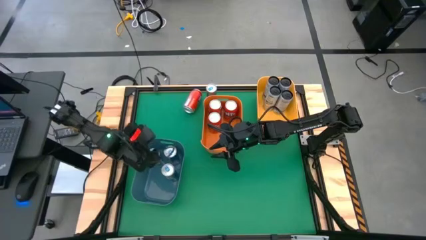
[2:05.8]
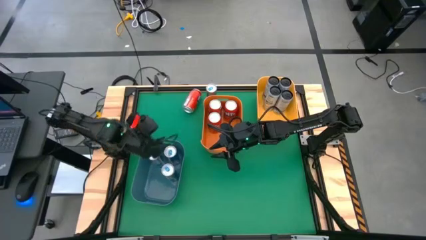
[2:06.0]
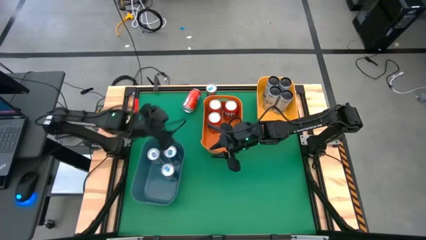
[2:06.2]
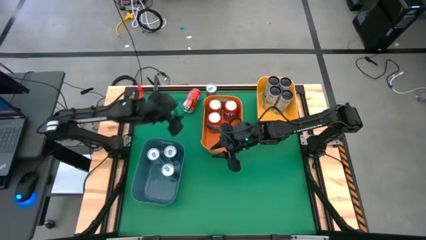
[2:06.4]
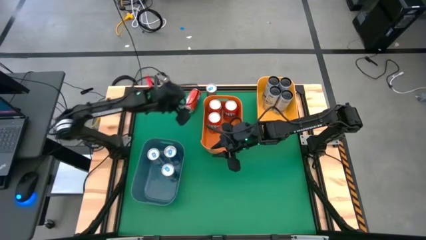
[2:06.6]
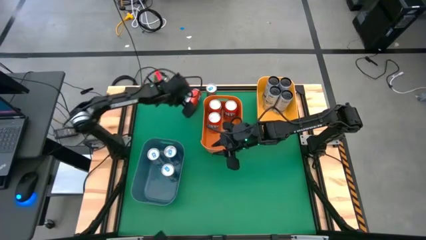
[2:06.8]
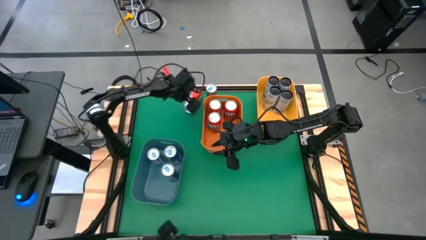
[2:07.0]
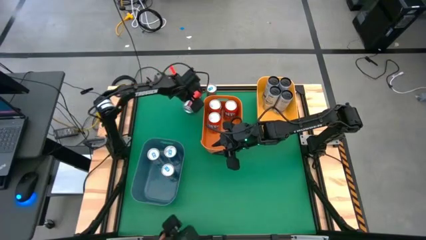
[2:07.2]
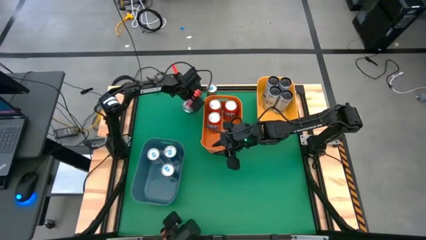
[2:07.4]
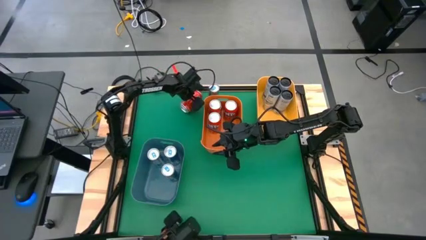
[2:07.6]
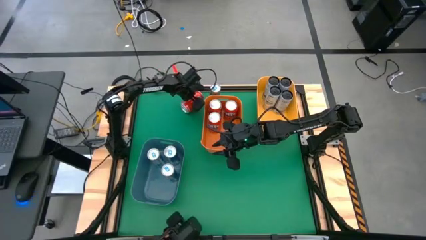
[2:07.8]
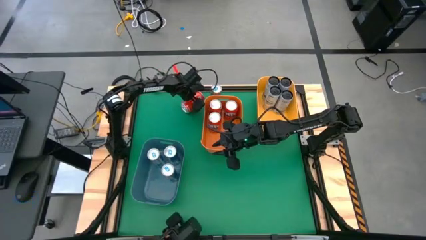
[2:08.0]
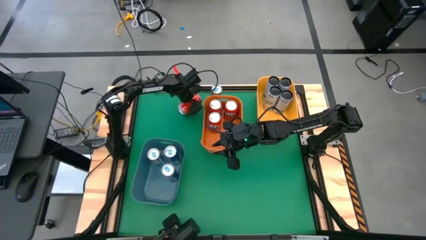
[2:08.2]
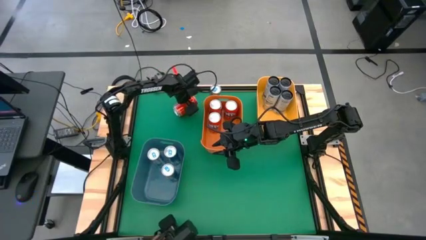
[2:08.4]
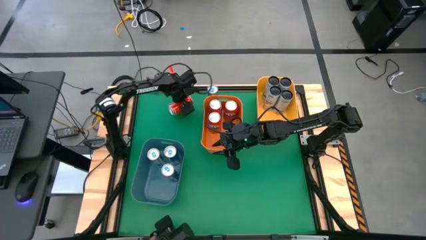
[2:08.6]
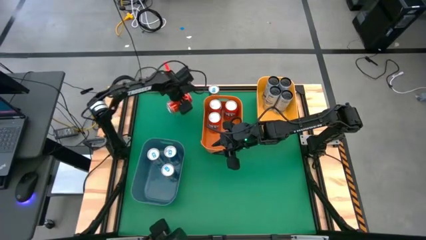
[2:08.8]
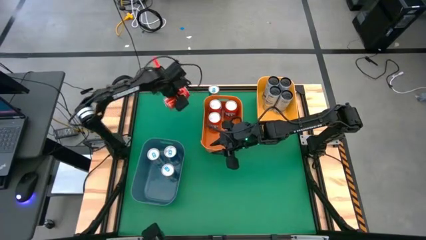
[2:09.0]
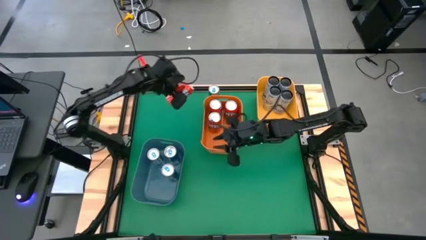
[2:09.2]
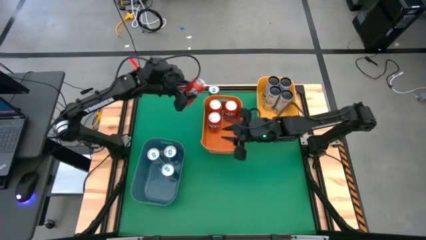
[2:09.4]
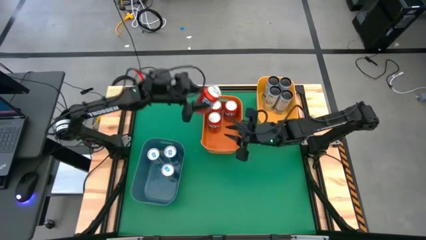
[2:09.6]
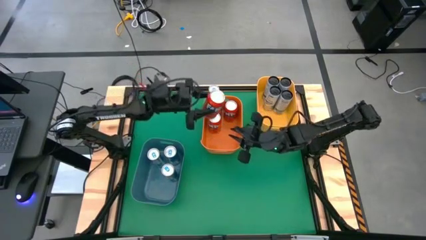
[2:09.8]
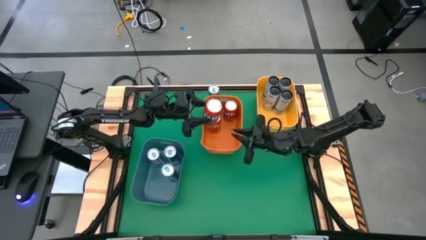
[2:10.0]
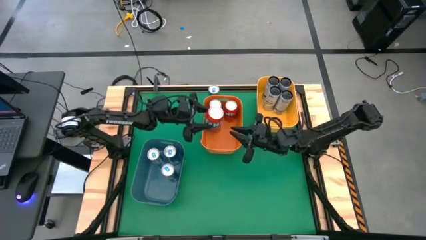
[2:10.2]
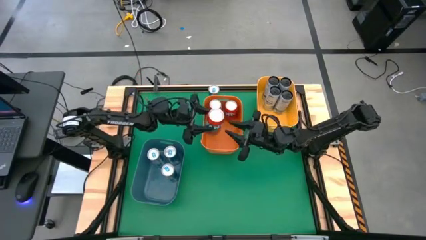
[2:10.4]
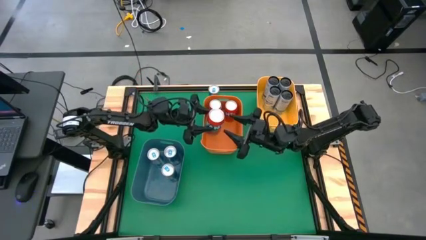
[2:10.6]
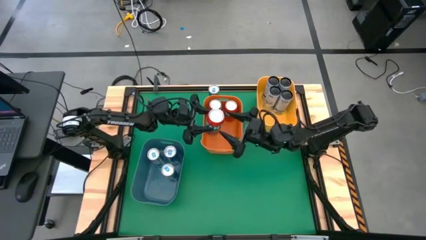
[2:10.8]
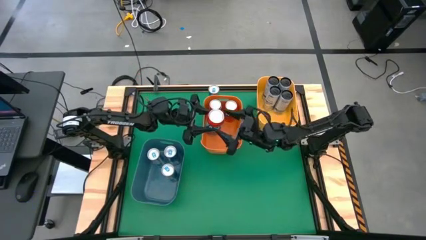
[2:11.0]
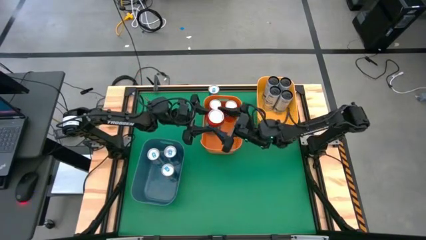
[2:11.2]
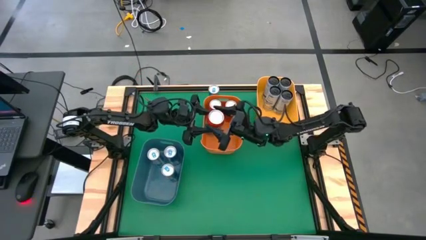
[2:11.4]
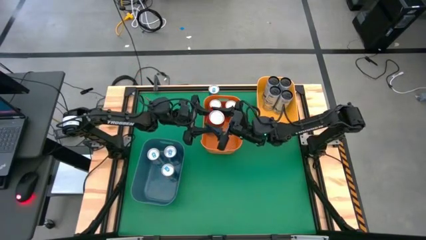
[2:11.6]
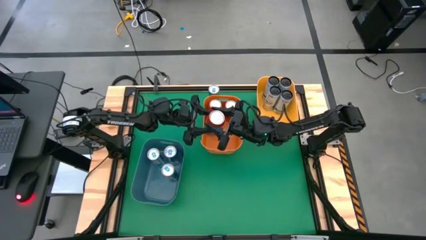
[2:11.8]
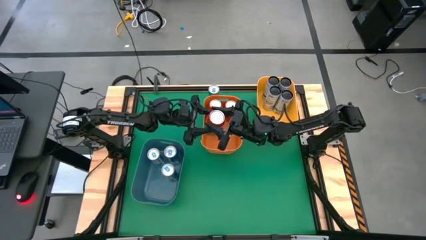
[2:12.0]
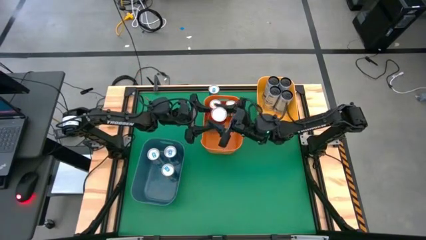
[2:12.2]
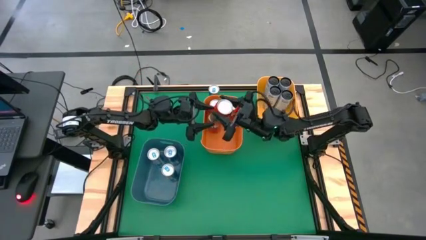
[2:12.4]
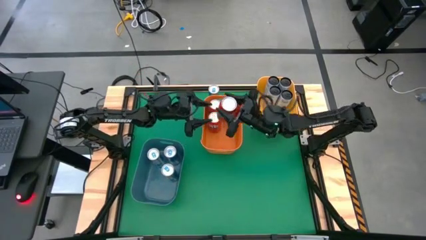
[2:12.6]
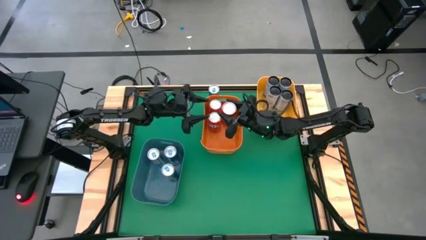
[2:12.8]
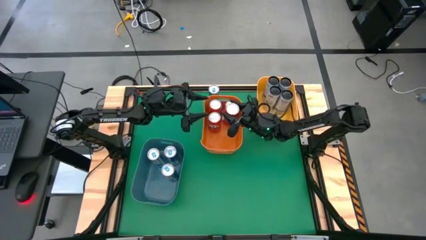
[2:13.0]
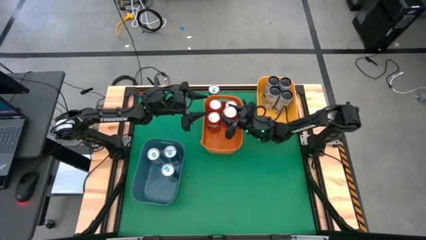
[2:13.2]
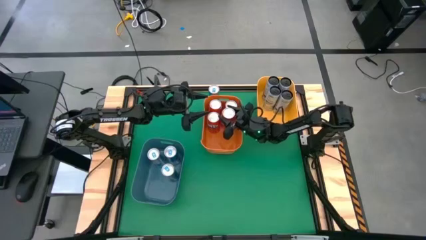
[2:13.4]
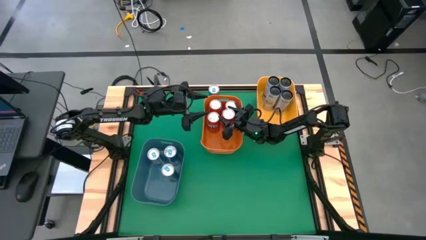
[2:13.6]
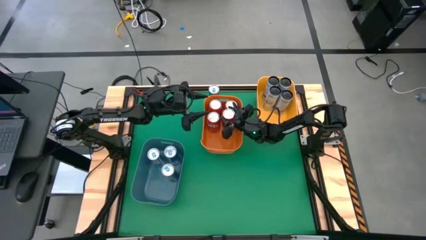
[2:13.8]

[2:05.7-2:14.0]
Task: Sort soda cans
Put the orange soda can into the orange bin

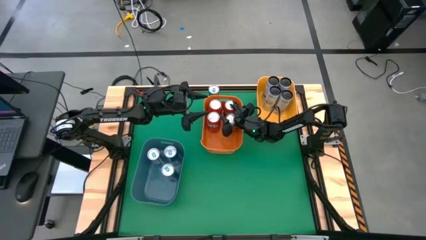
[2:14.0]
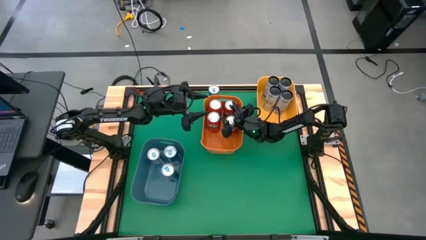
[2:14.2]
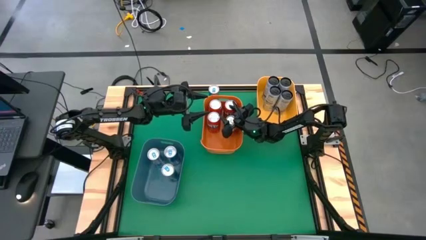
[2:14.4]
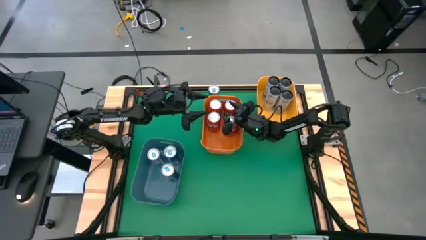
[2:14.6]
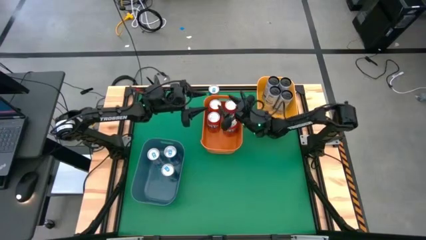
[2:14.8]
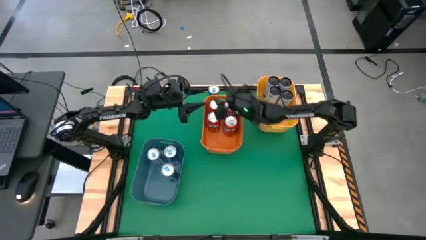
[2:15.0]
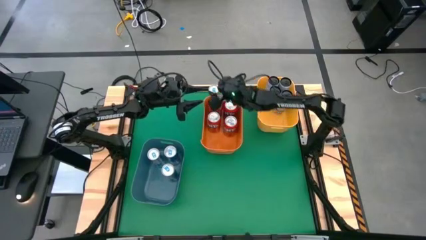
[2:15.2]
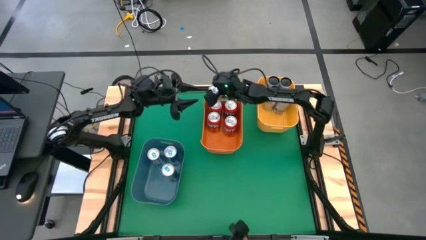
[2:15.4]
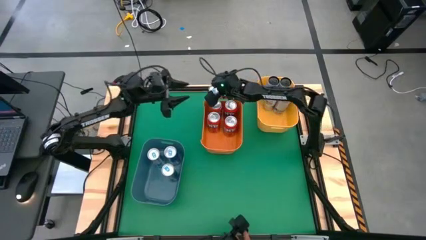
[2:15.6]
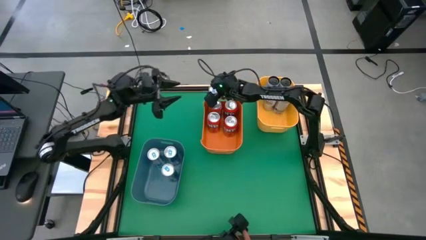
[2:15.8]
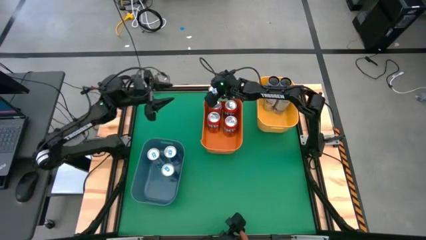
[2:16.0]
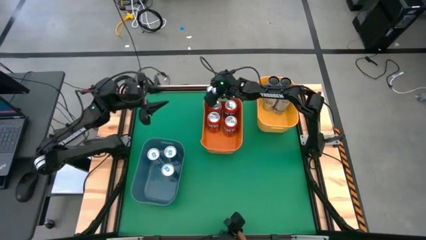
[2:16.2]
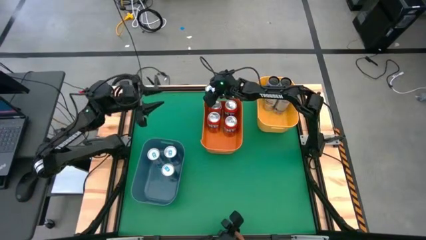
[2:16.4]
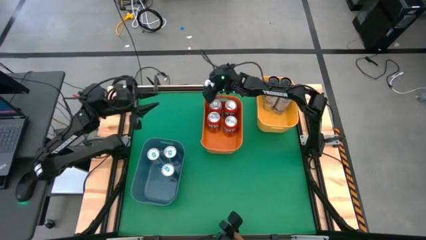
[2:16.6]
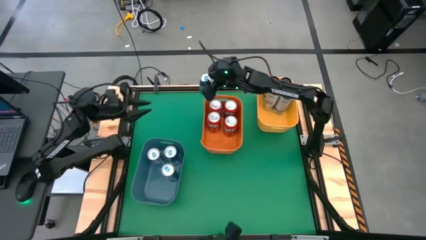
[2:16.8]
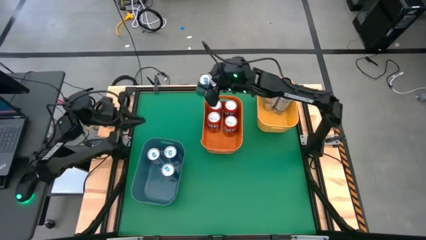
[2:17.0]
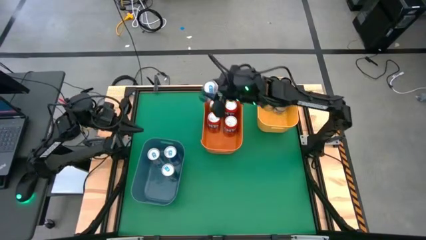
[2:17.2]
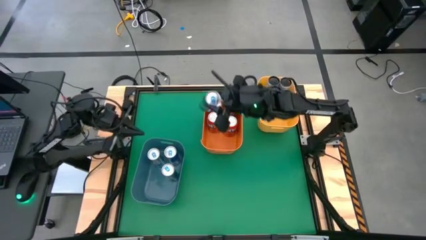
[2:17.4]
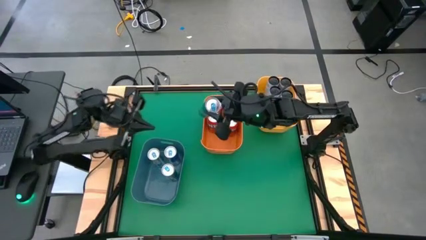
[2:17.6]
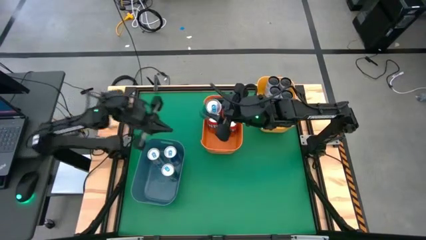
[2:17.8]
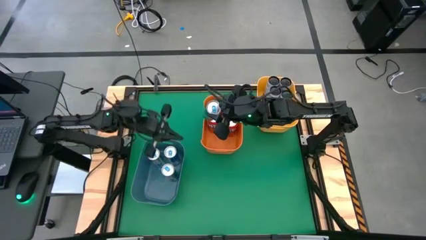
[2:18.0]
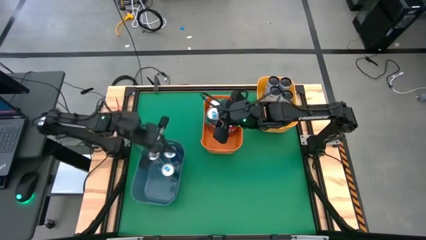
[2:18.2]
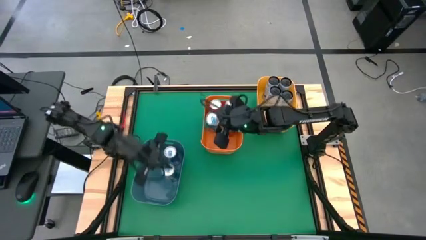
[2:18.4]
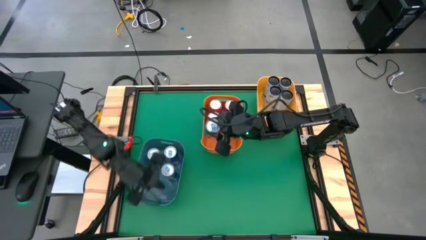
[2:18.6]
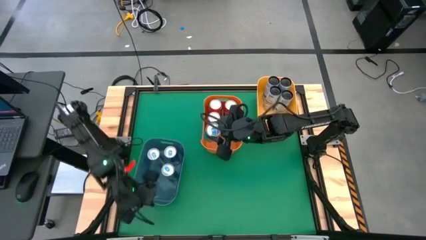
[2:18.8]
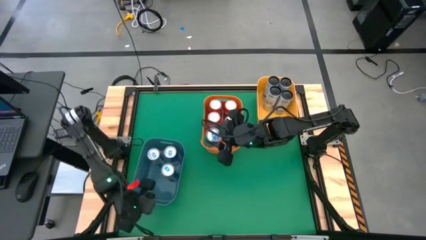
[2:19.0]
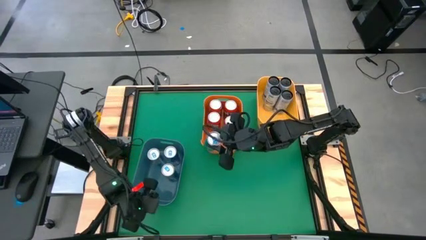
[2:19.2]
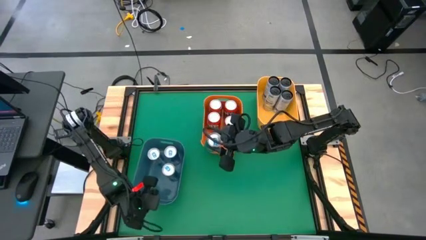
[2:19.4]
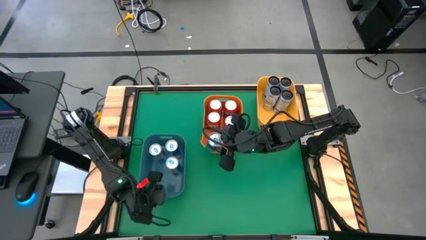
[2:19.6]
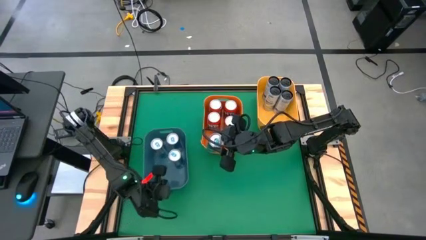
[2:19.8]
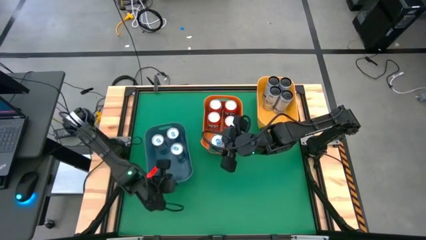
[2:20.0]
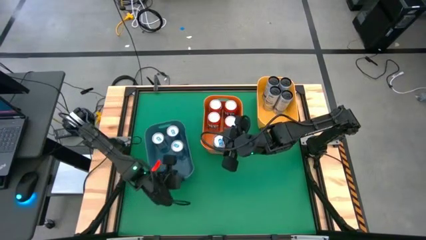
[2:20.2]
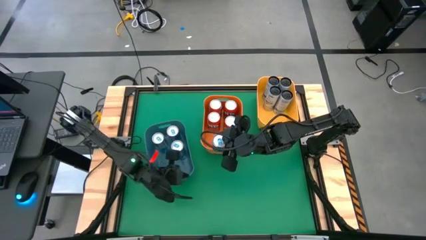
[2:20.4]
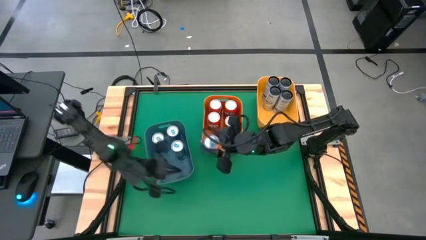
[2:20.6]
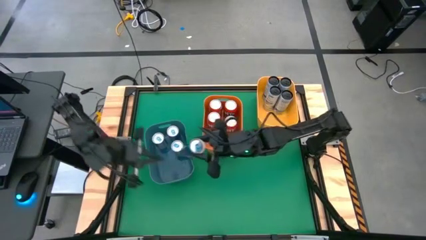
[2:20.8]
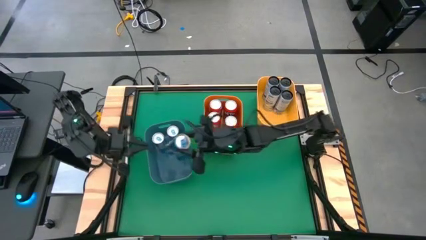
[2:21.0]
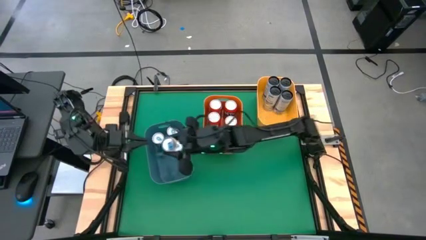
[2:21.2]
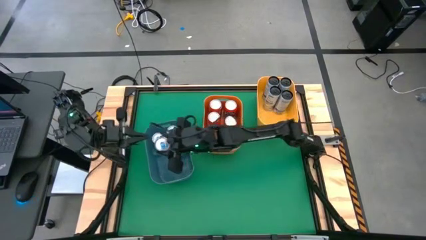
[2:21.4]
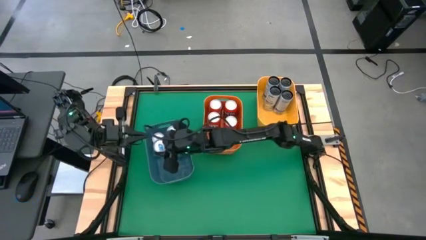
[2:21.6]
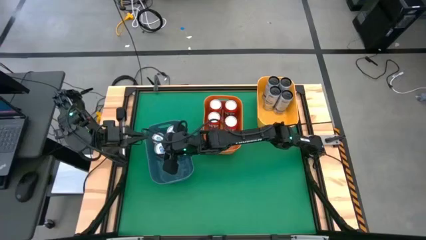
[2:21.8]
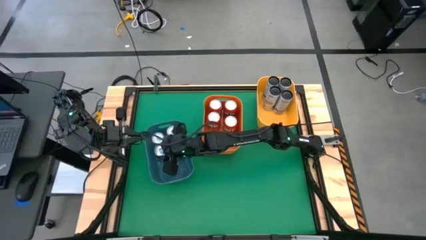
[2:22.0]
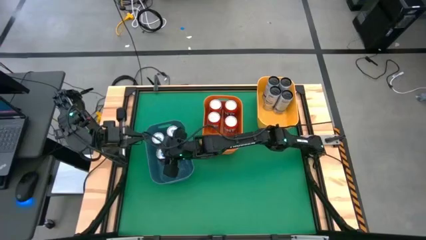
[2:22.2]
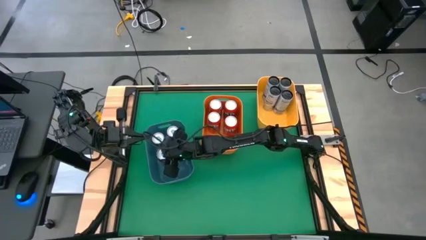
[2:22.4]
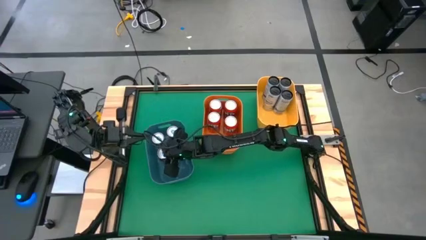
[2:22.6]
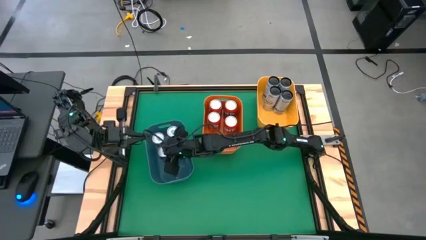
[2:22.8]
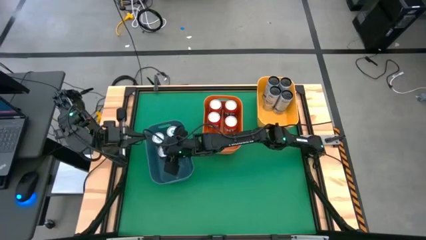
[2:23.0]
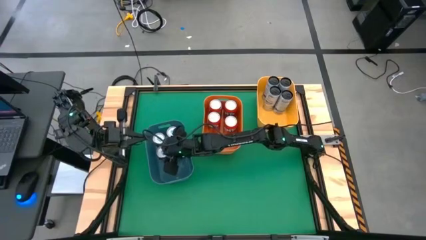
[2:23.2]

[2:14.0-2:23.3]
Put the blue soda can into the blue bin
